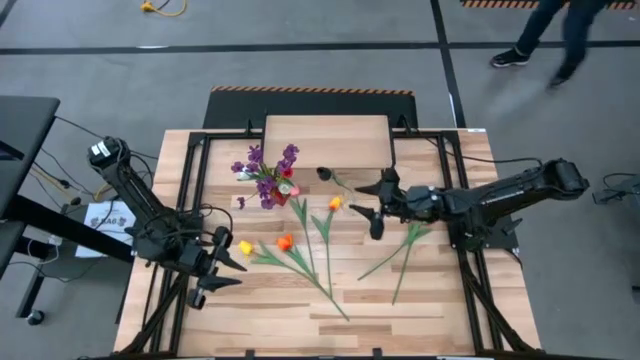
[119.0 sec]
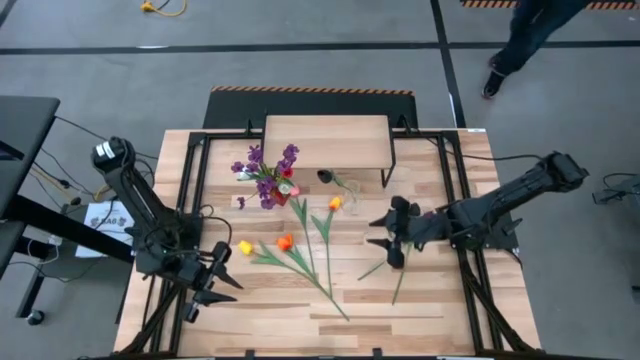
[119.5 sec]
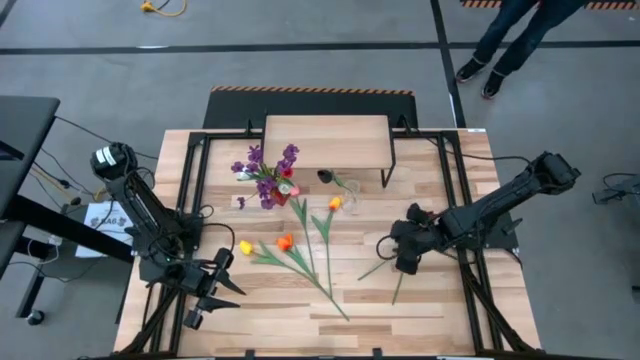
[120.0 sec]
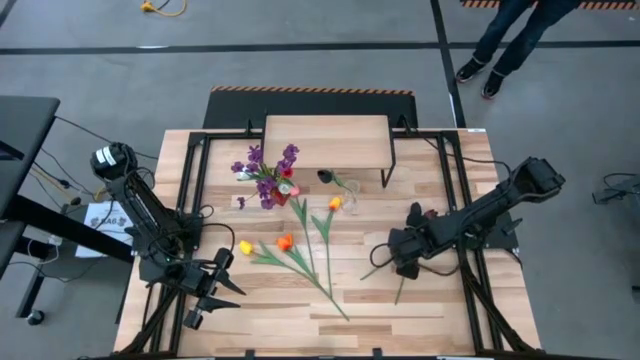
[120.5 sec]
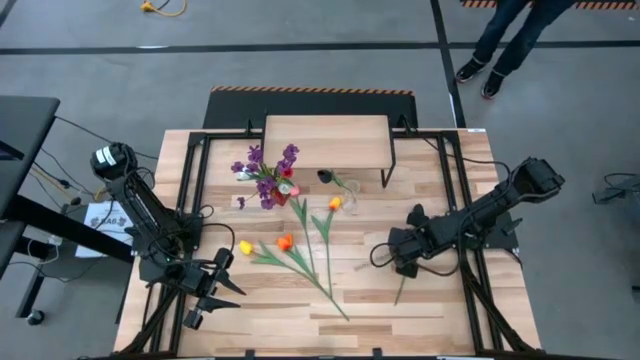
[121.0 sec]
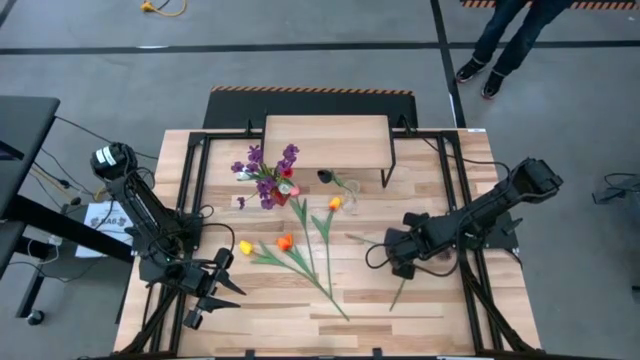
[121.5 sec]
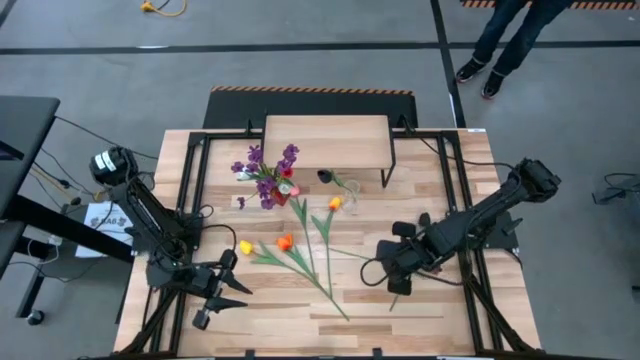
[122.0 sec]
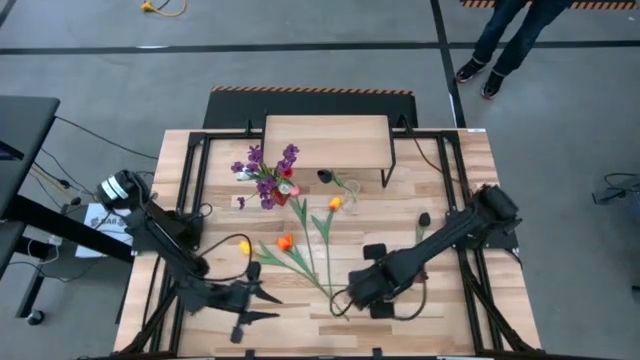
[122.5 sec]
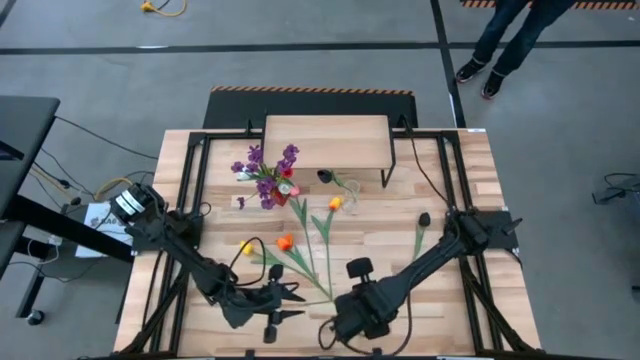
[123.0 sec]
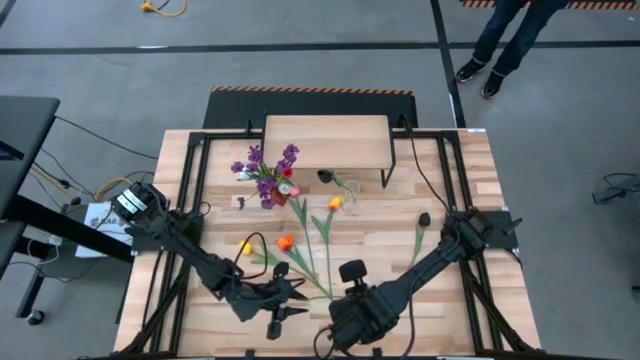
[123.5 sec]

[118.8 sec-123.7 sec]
Task: Pick and place flowers into a vace then onto a shelf
Put the dark red flower into the transparent flower vase

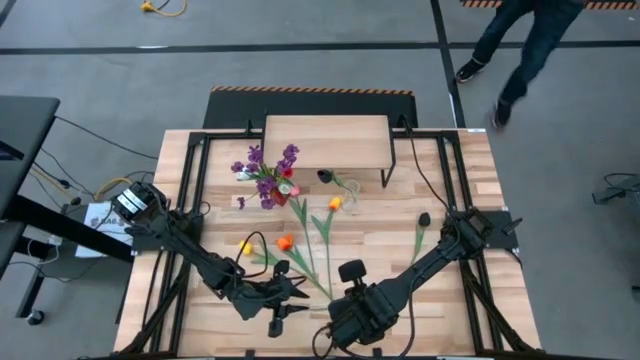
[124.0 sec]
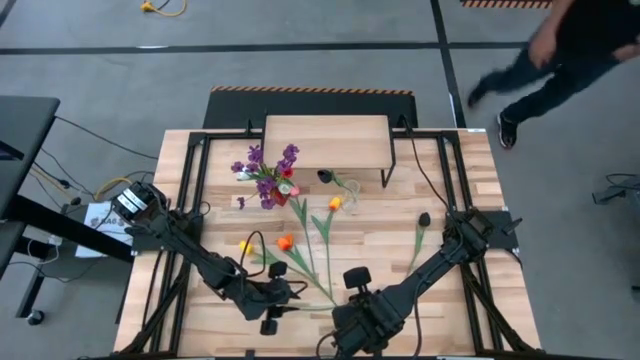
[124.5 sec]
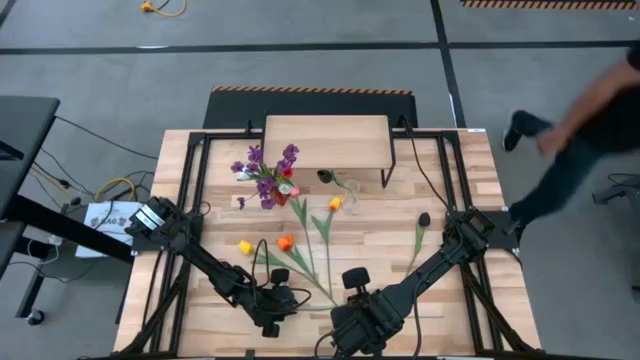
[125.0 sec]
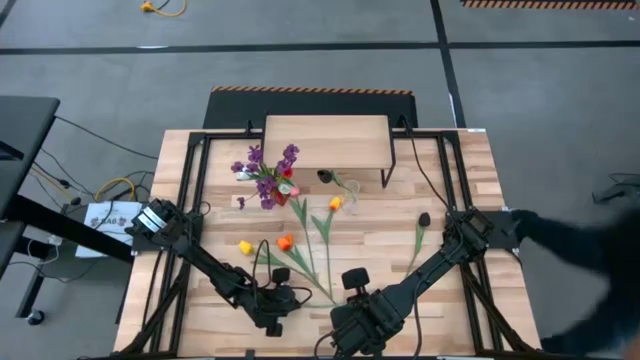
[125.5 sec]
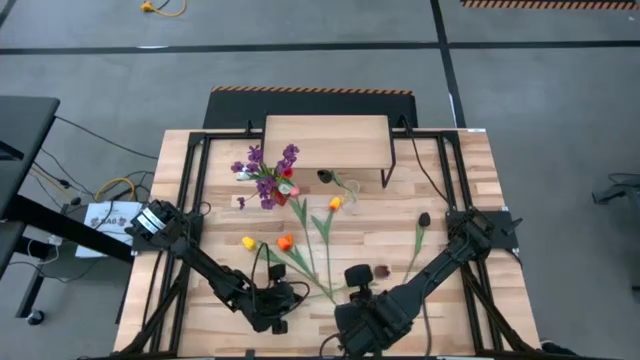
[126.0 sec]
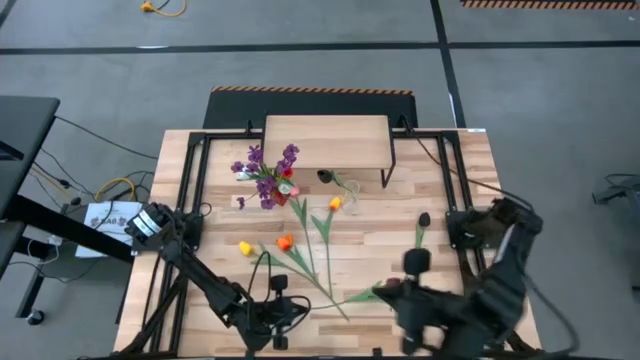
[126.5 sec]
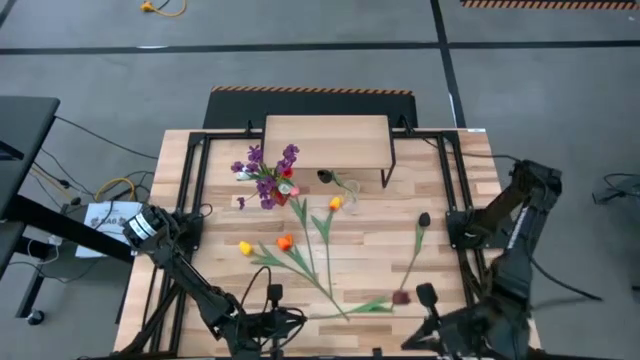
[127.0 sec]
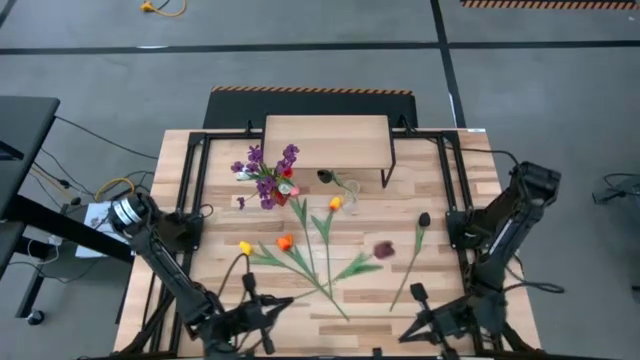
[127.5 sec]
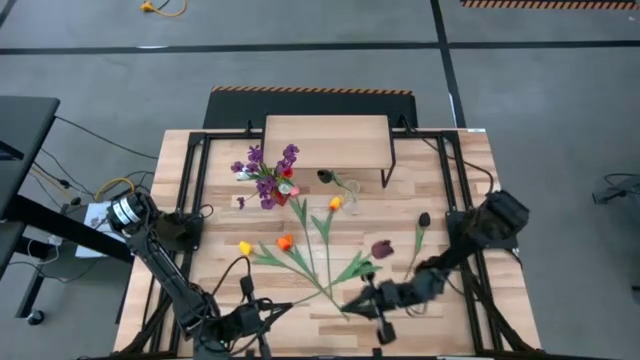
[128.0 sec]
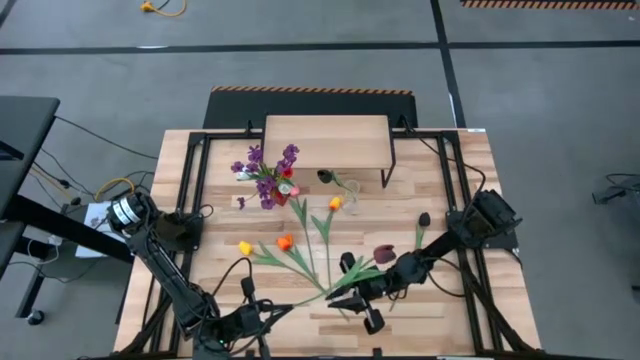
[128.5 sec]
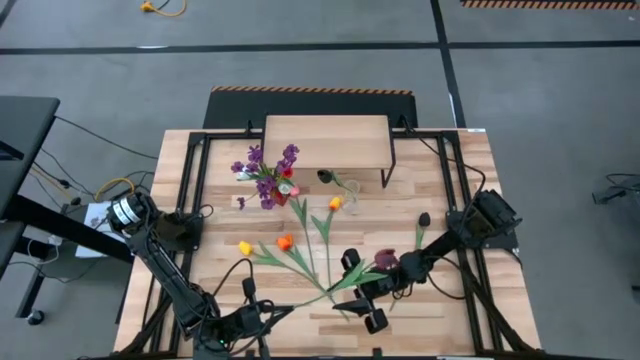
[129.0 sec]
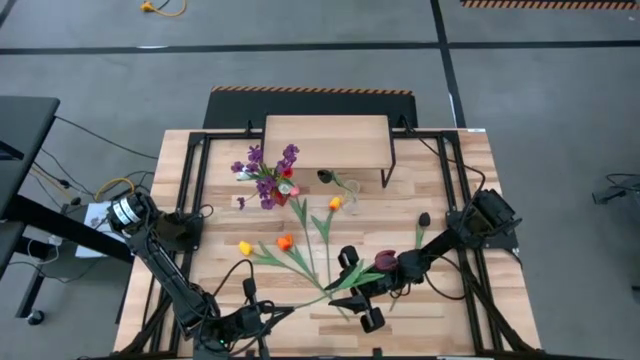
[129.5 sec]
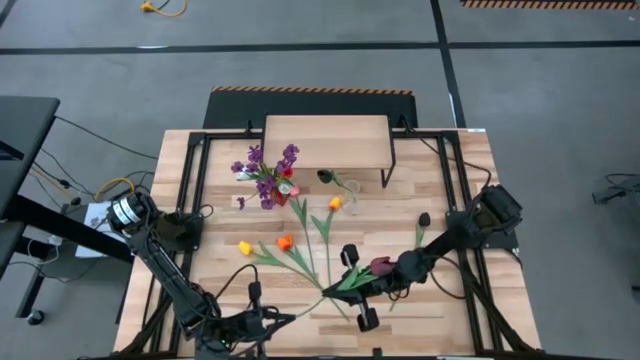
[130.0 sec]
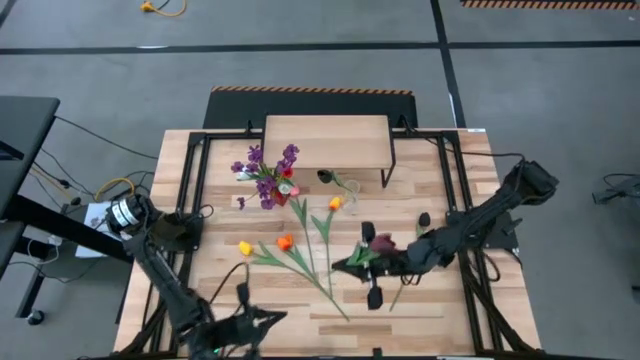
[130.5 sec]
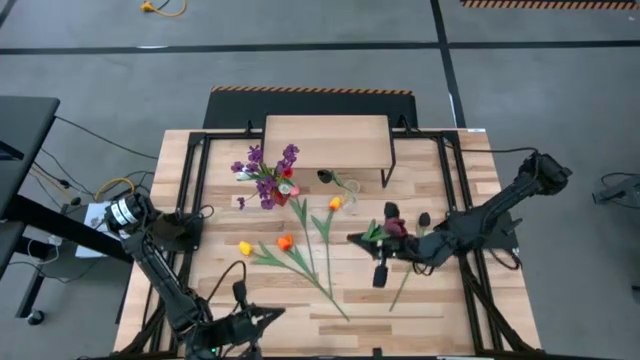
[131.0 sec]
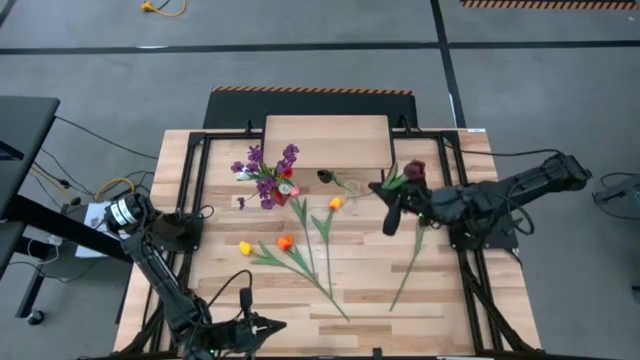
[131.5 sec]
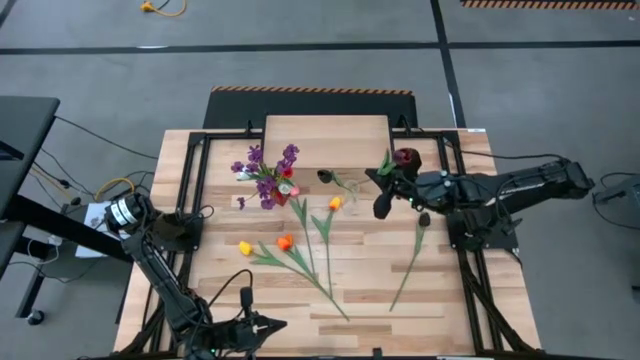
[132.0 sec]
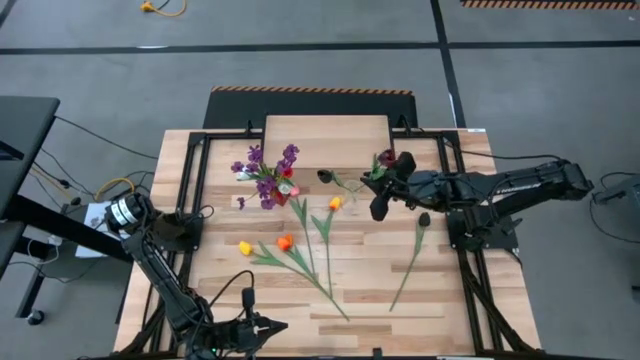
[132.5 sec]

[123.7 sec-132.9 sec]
Put the dark red flower into the transparent flower vase

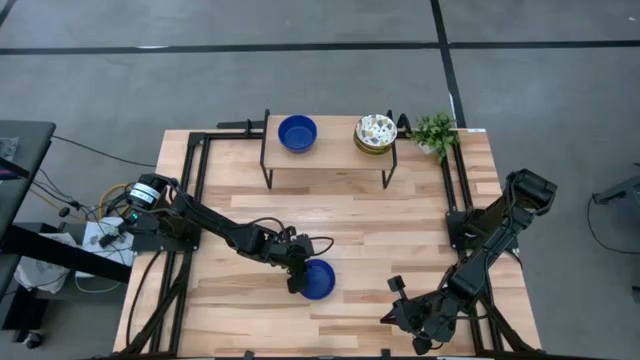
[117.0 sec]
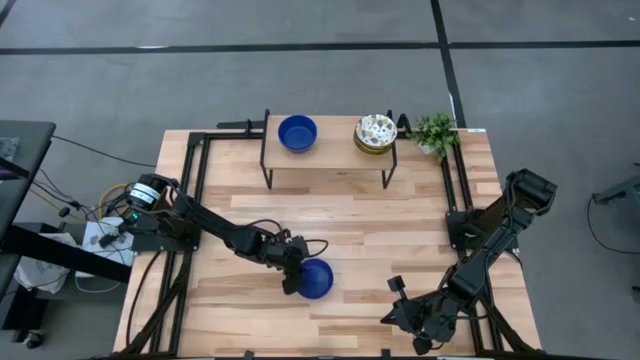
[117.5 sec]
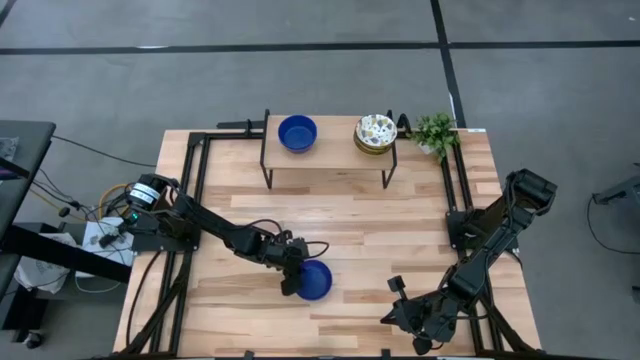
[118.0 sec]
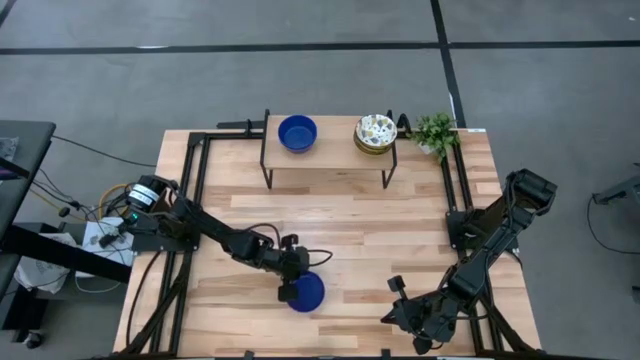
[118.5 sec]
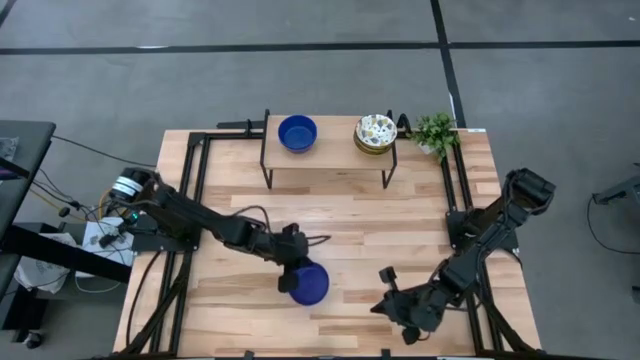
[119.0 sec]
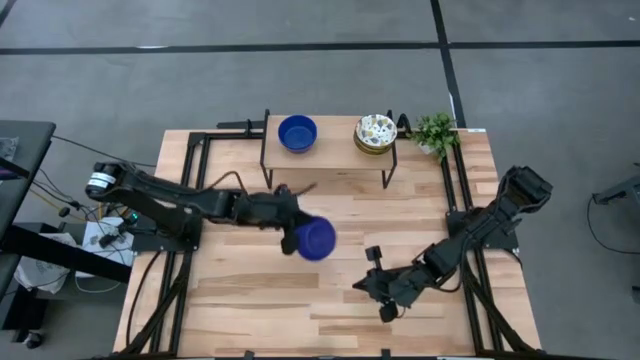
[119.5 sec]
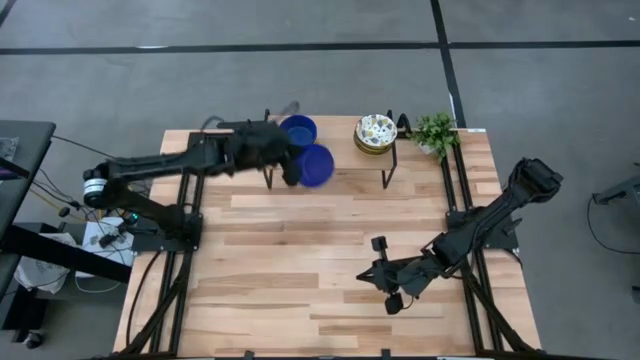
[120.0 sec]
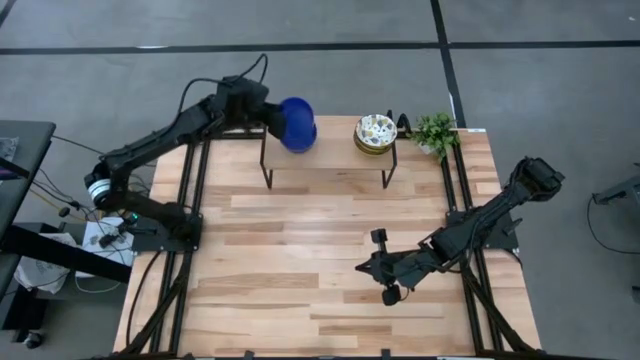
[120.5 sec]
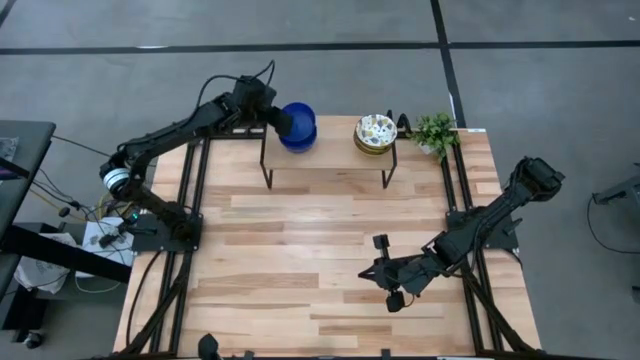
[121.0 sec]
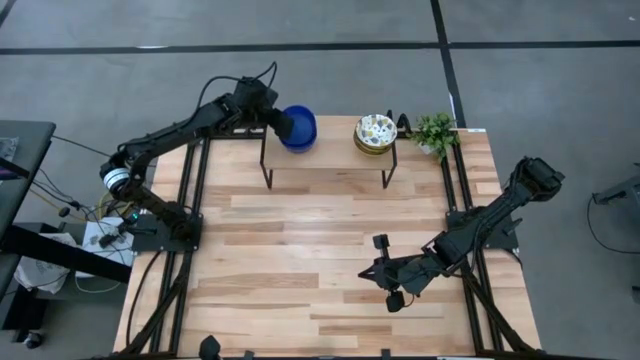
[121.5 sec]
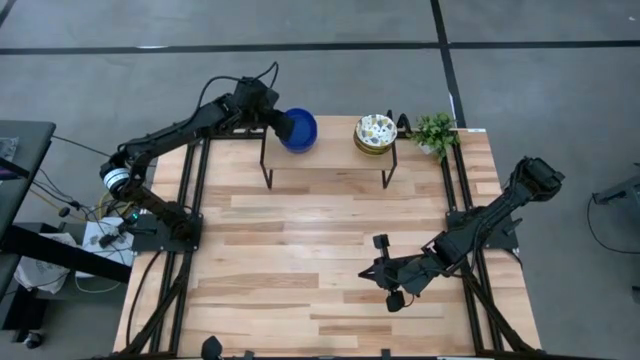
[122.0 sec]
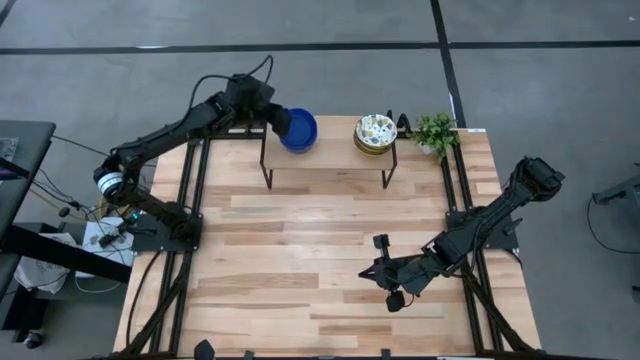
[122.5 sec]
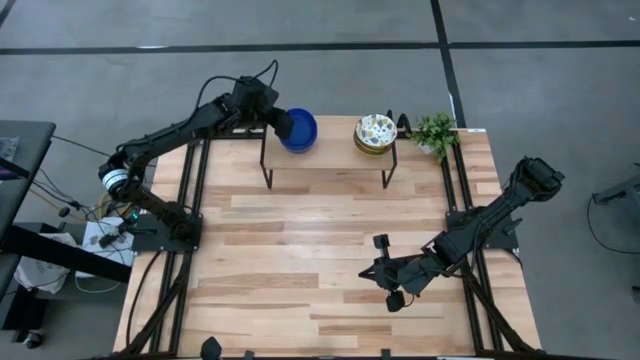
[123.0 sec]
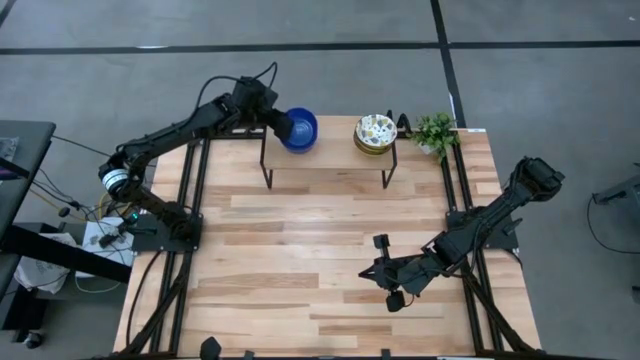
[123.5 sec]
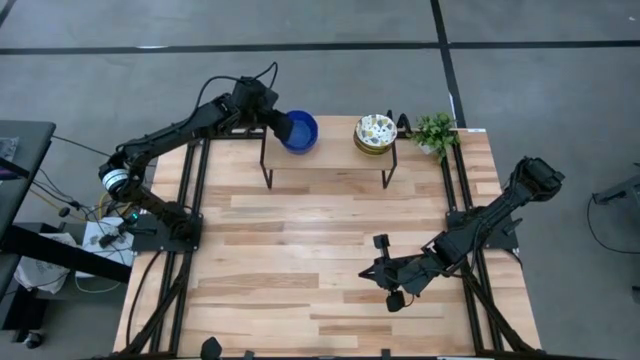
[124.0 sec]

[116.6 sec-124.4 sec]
Task: Pick & Place Mini bowls
Stack the blue bowl on the blue bowl on the shelf
